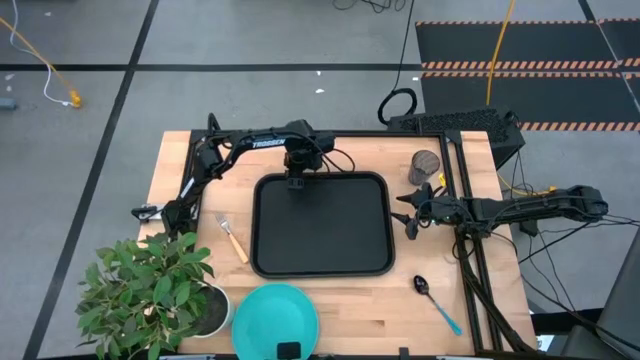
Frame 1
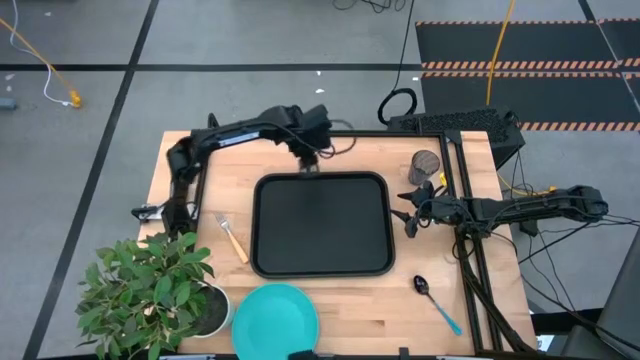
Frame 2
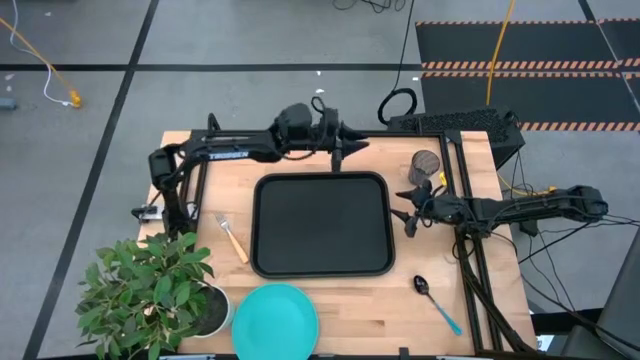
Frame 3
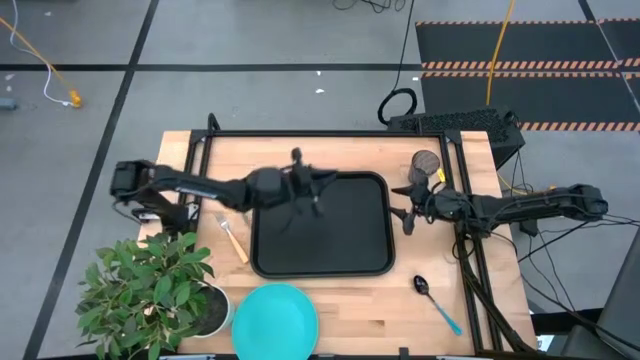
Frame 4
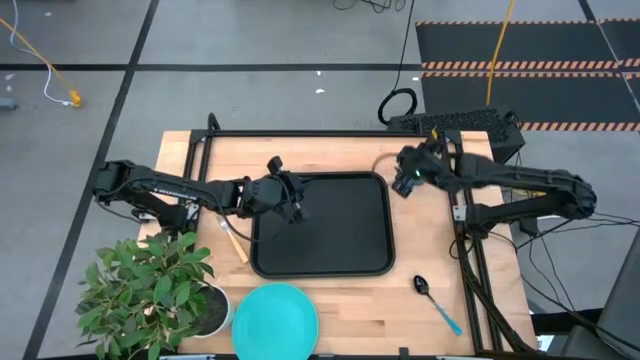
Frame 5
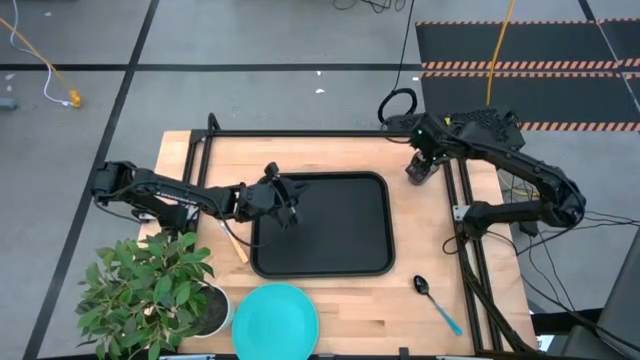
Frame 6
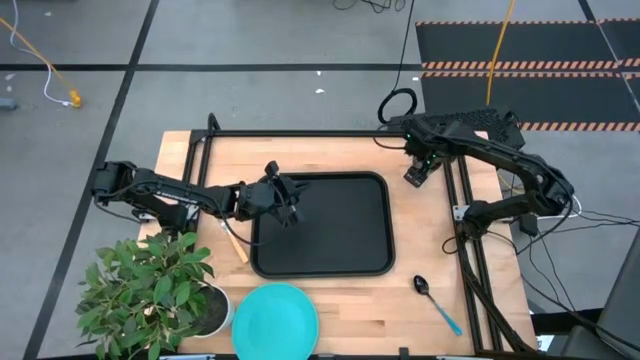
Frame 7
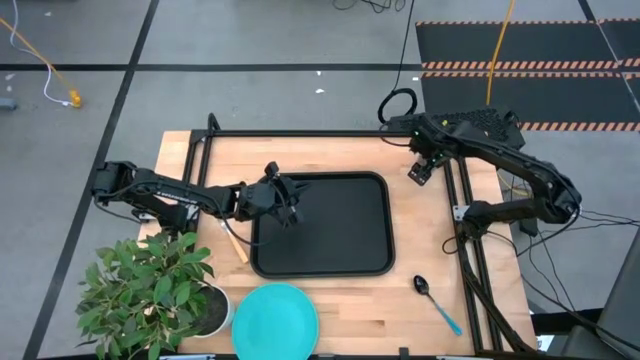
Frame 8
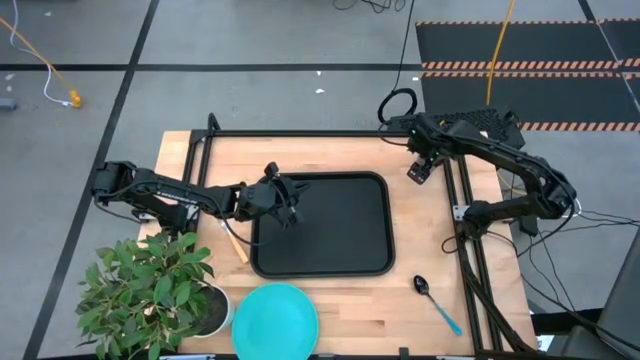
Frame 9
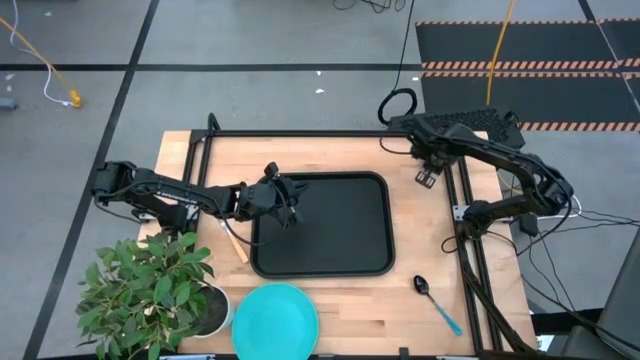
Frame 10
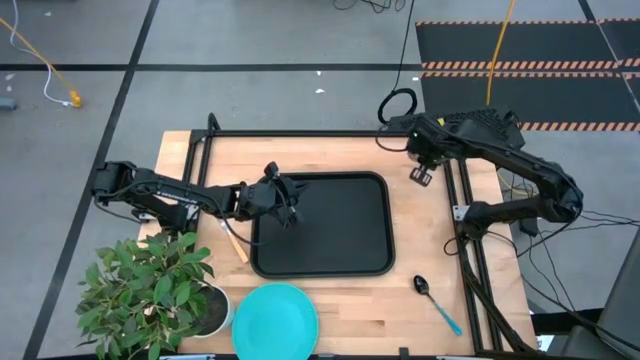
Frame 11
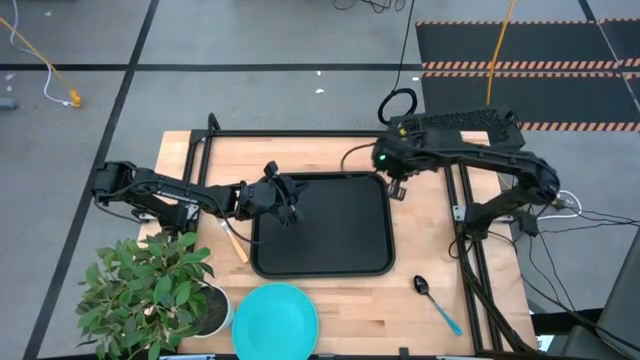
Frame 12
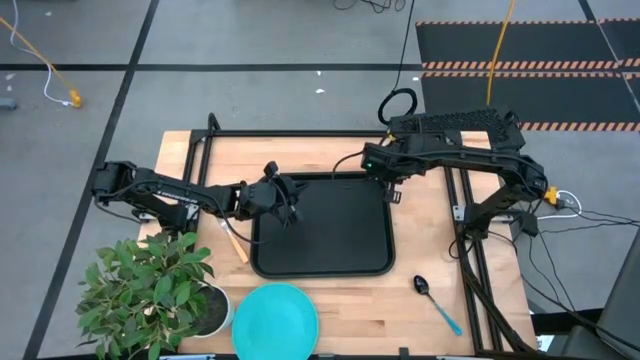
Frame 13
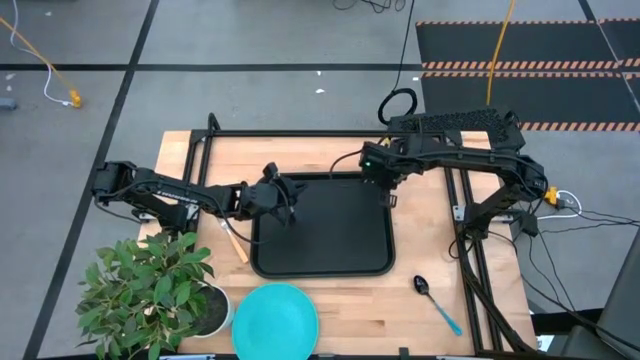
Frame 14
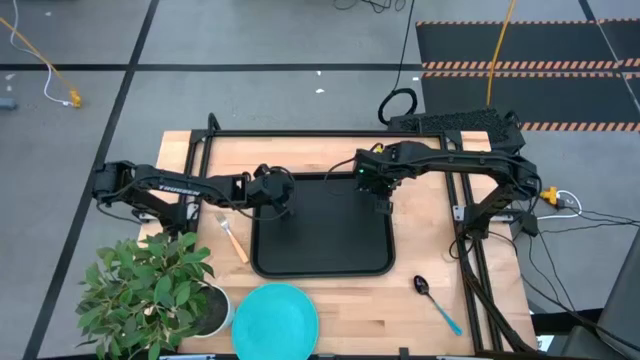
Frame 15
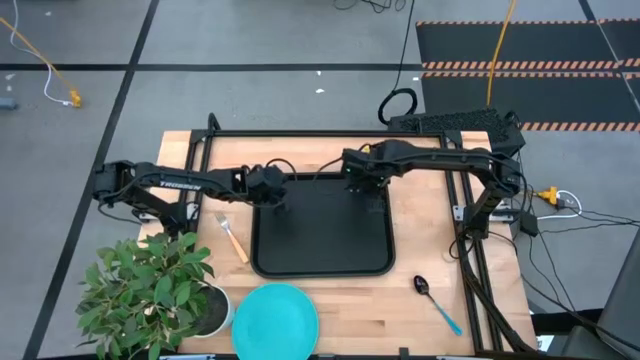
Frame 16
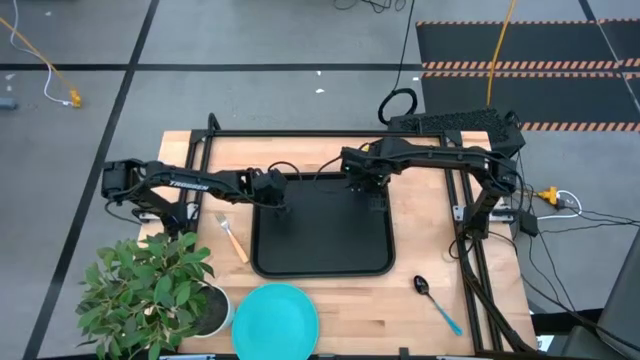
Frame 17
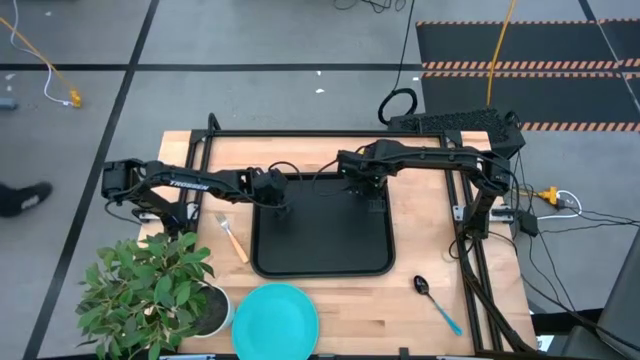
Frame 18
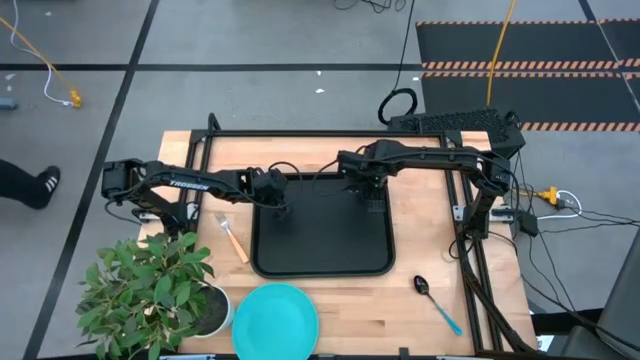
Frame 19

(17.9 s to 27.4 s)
Task: Pick and place plate/cup/fork/spoon on tray
Put the blue cup on the black serving tray

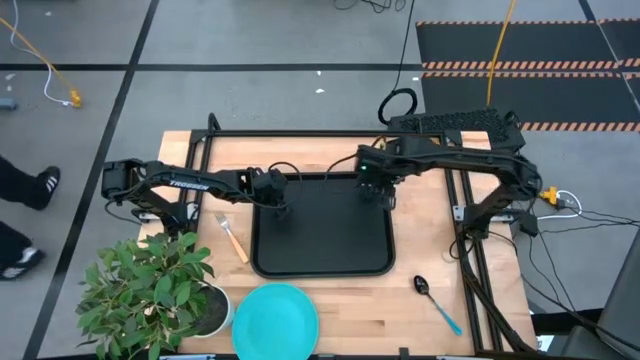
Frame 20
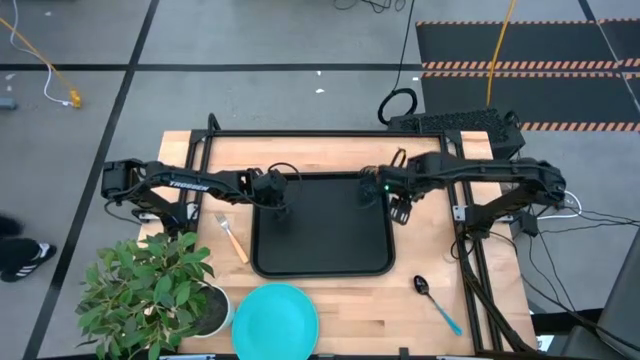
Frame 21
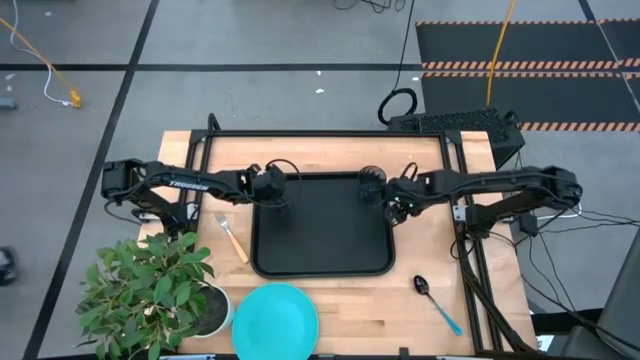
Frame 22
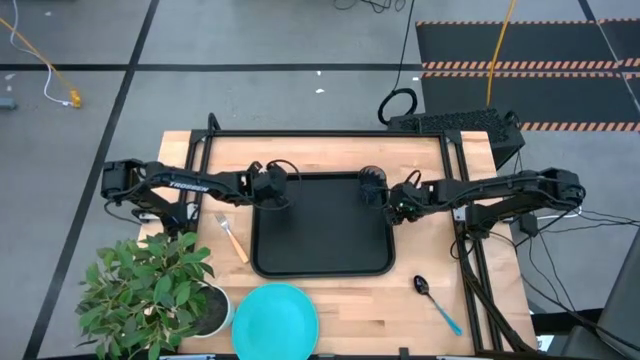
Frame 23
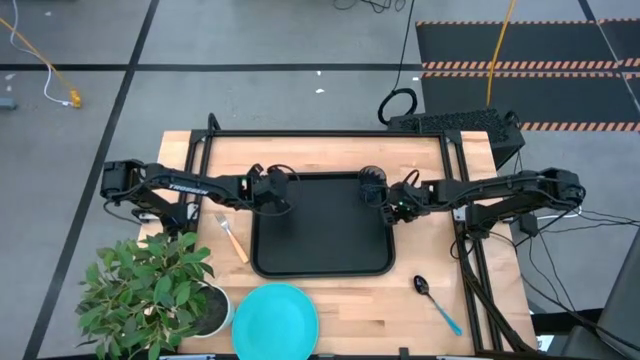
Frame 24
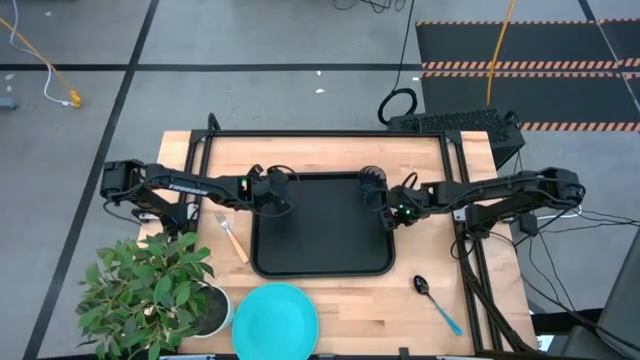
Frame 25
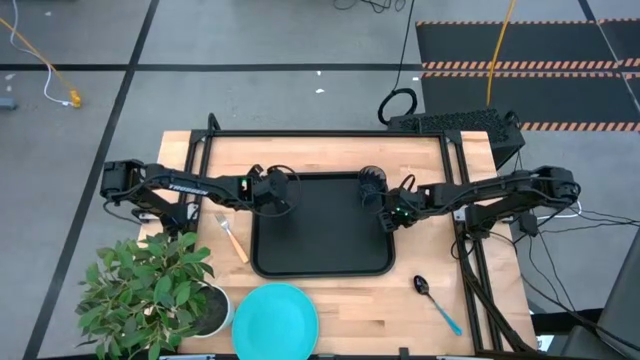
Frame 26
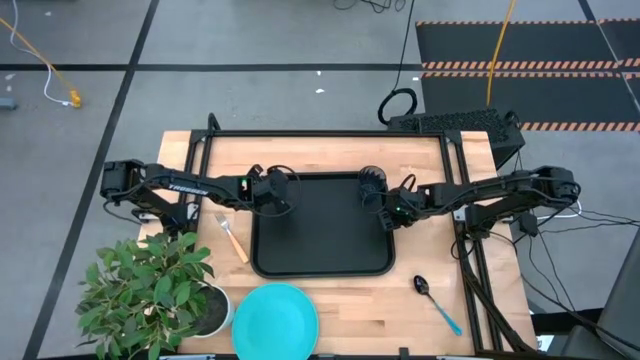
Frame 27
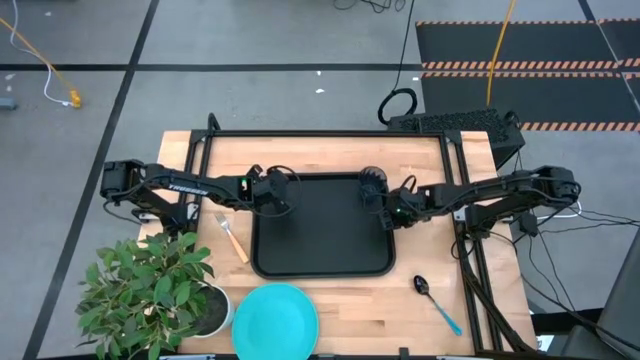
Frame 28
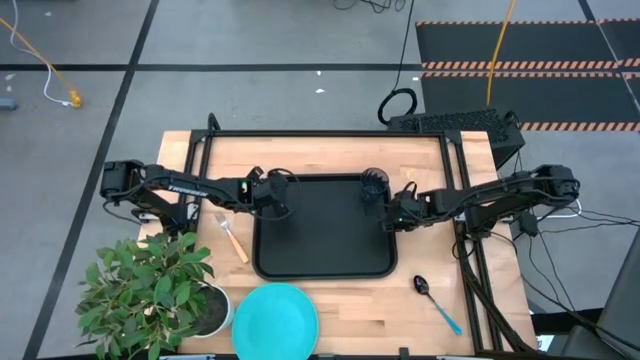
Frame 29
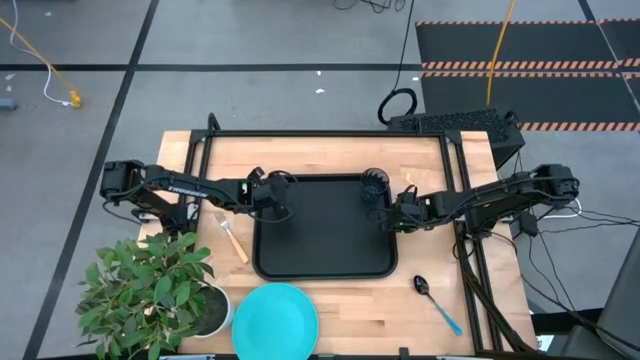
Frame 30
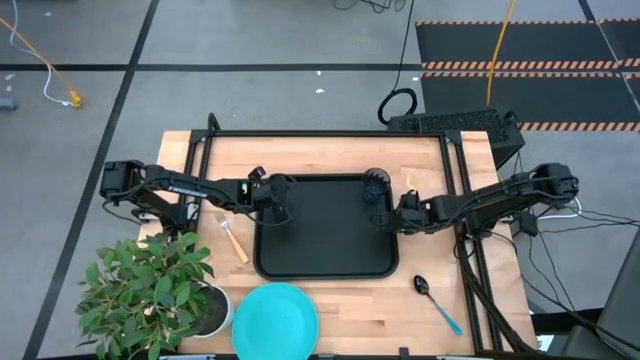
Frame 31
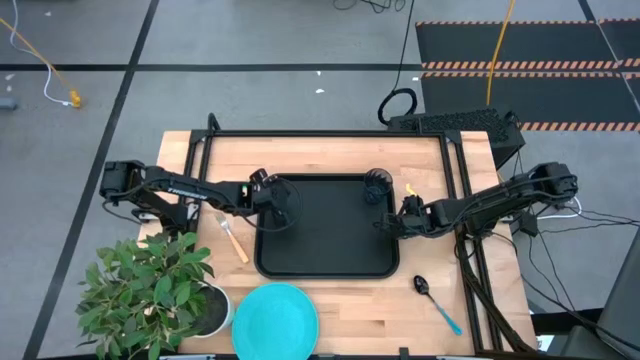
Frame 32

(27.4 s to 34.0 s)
Adjust the black serving tray

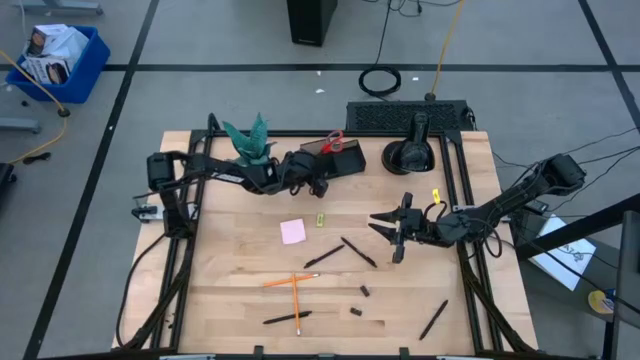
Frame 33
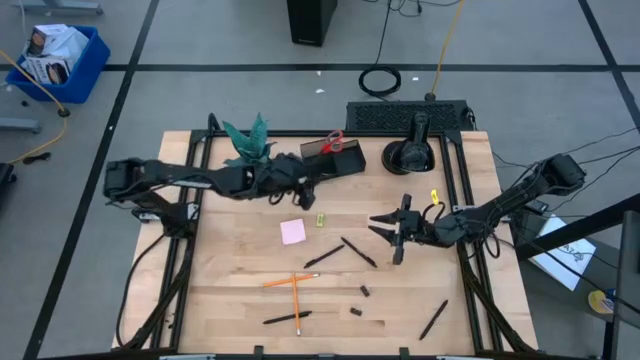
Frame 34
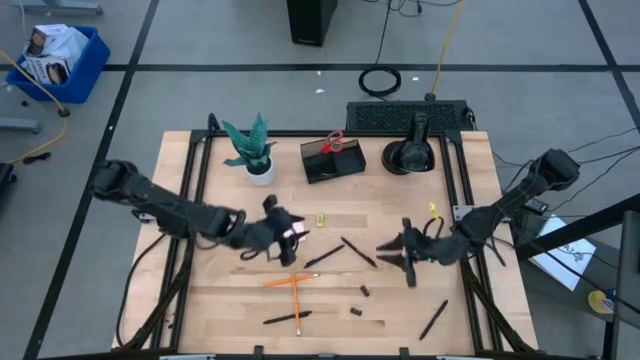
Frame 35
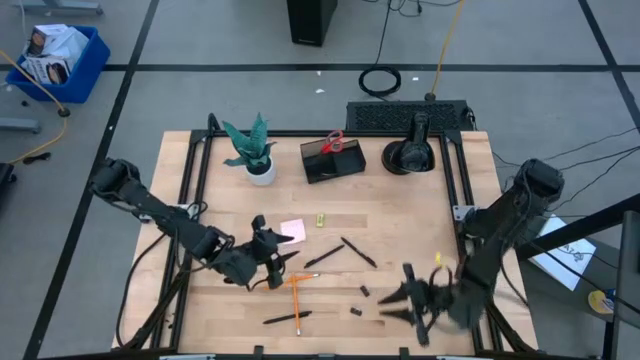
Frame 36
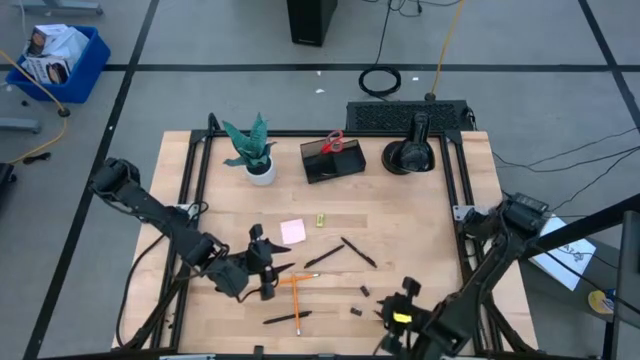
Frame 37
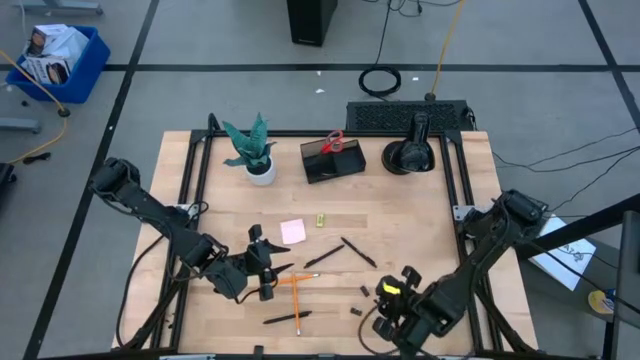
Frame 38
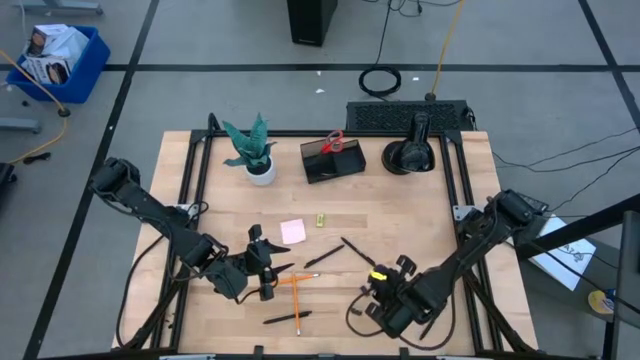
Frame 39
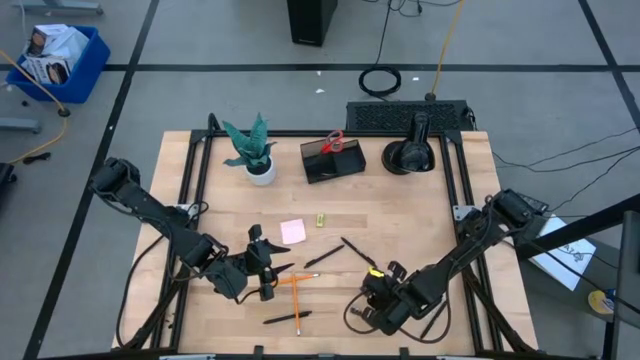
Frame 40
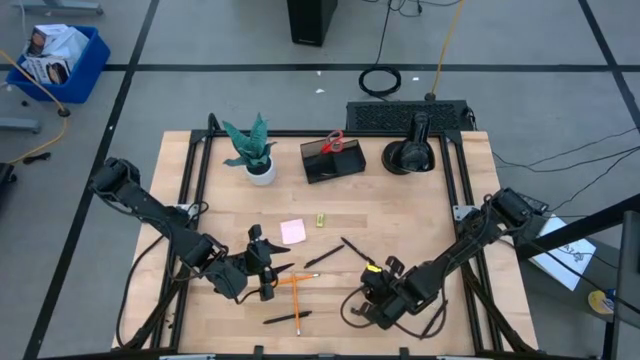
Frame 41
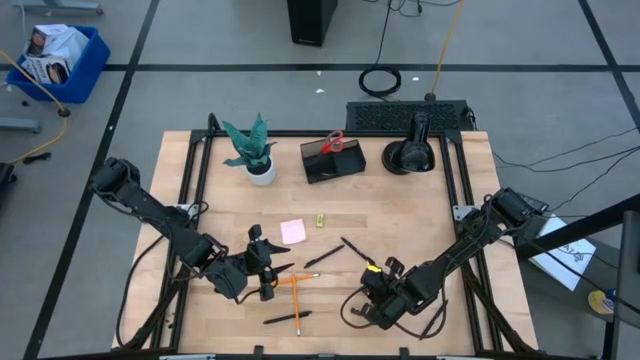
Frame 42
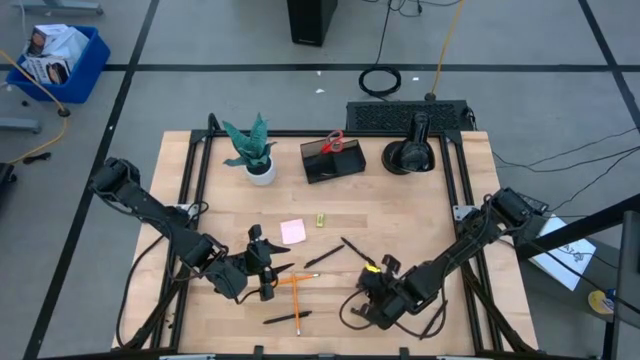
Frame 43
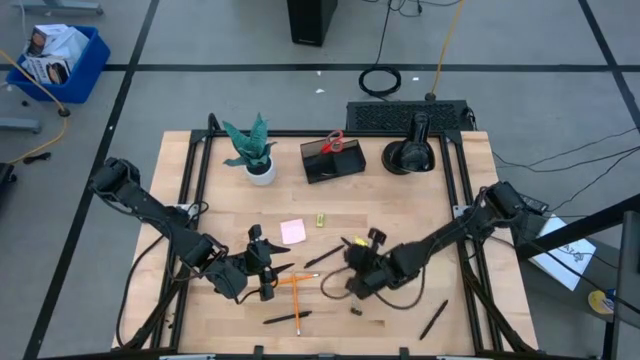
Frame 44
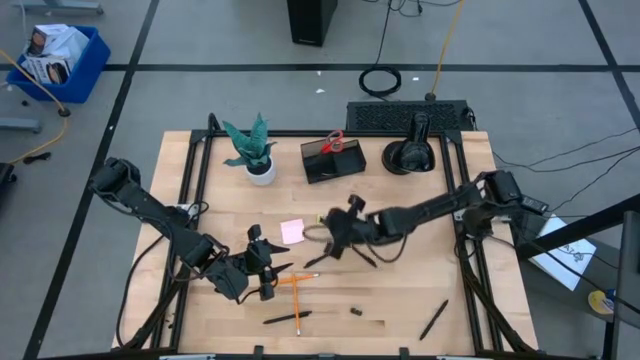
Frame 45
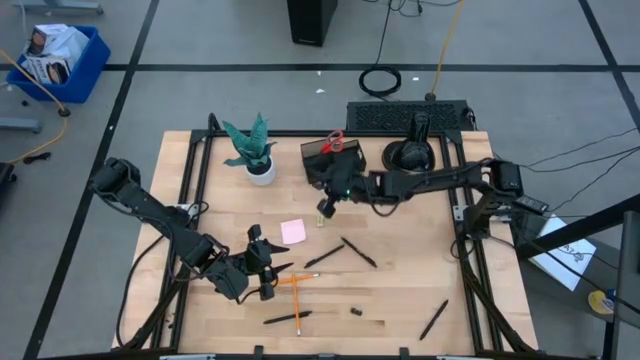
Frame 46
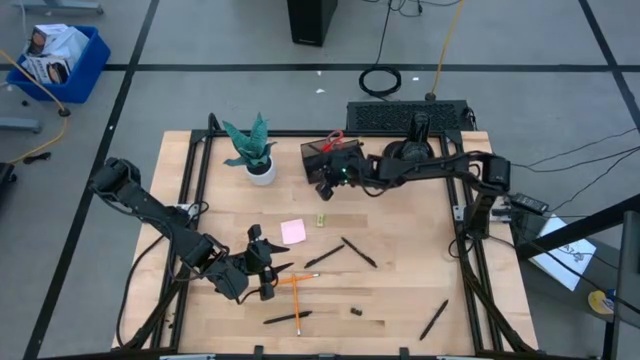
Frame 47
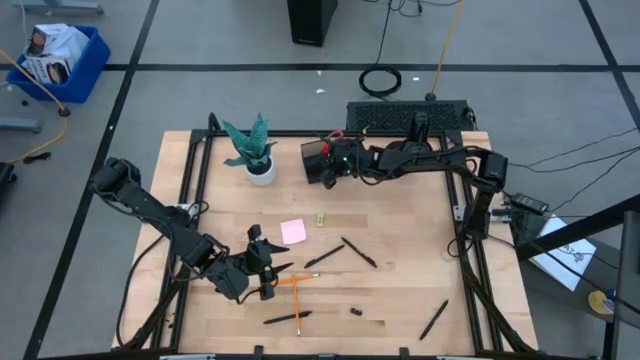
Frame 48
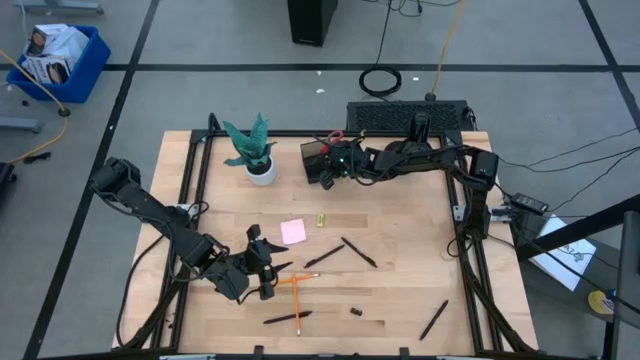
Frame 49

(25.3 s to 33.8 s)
Task: Pick and place office supplies into organizer
Put the black binder clip into the black black mesh desk organizer
